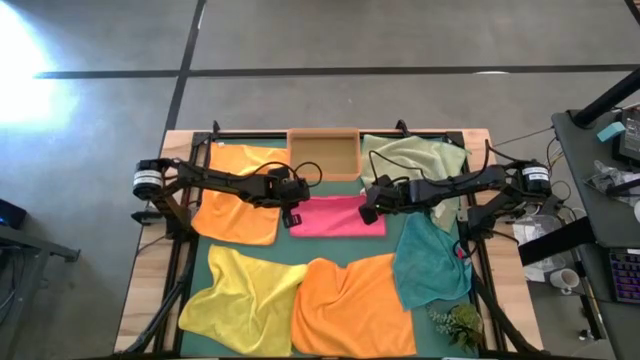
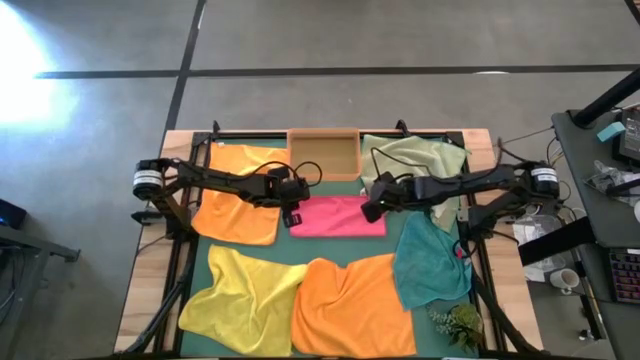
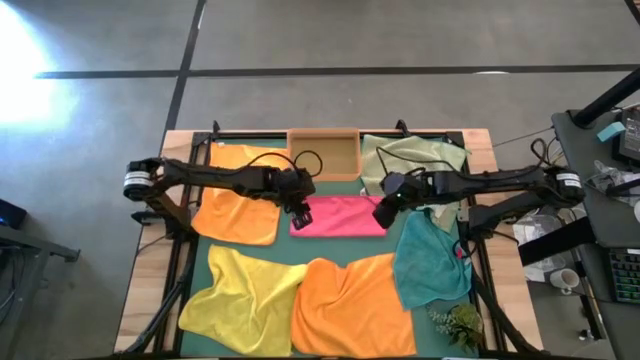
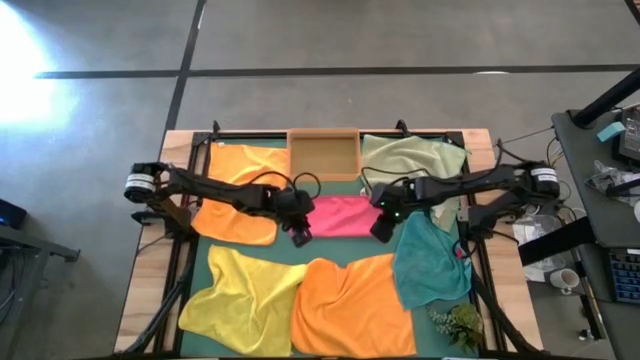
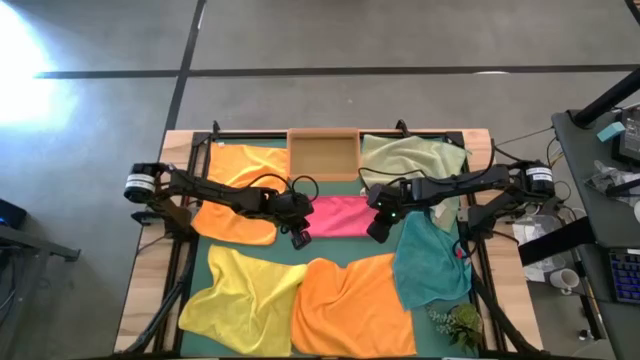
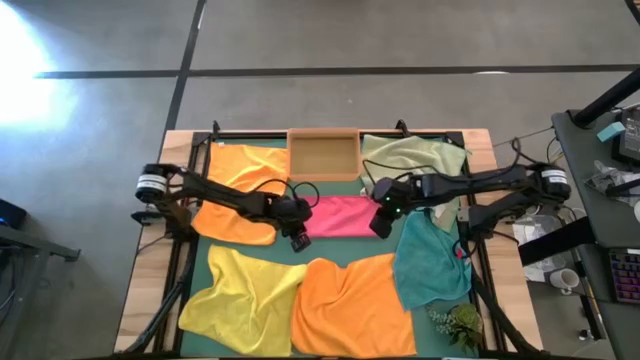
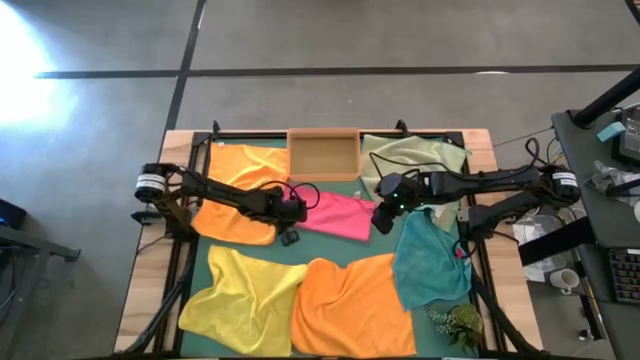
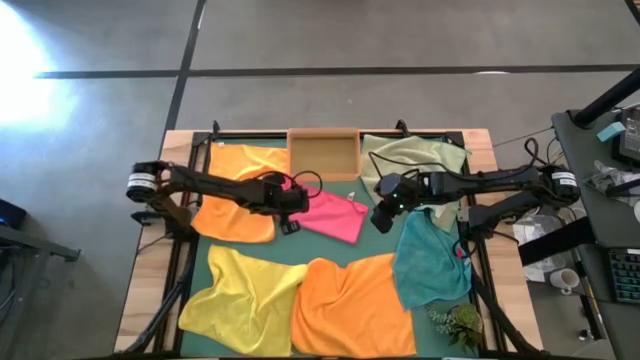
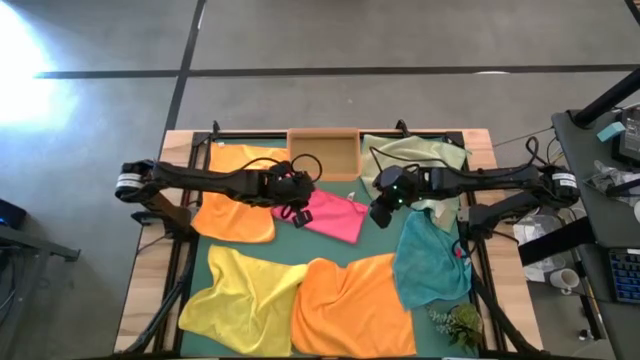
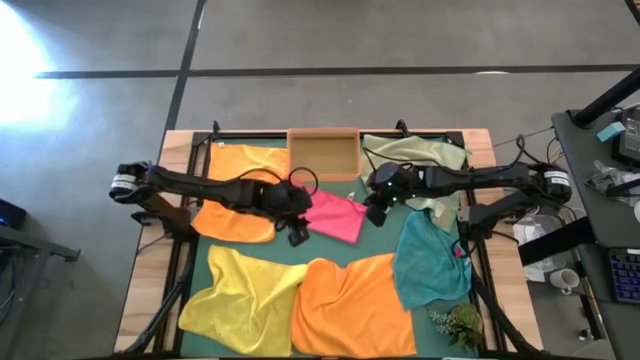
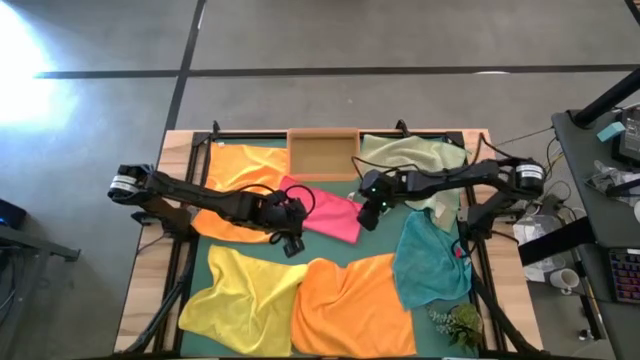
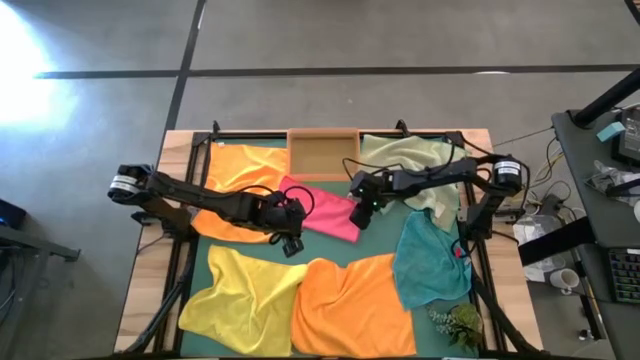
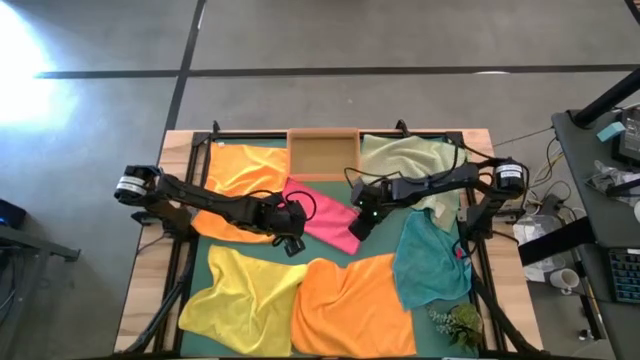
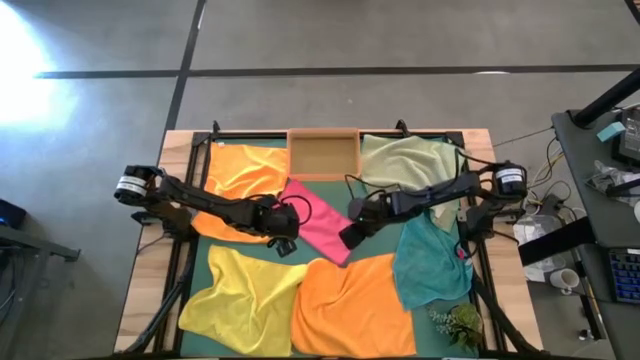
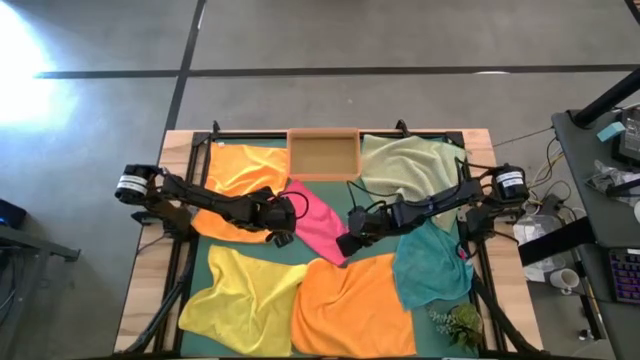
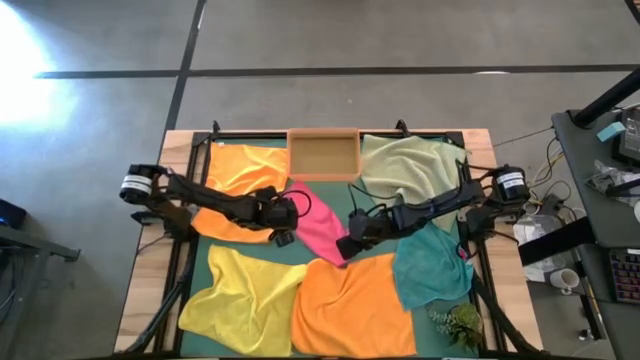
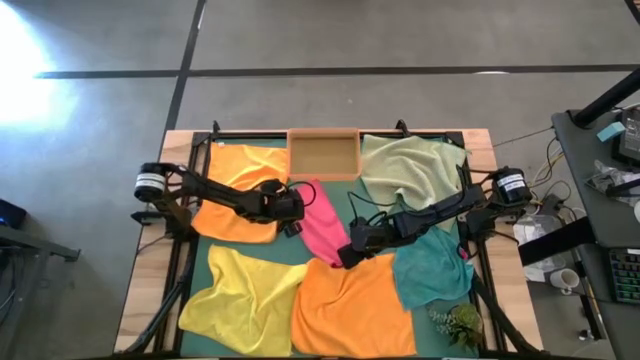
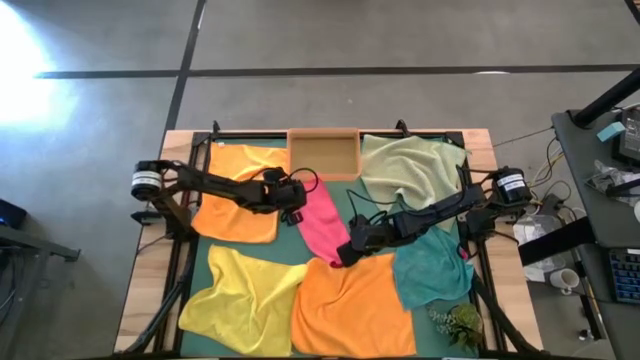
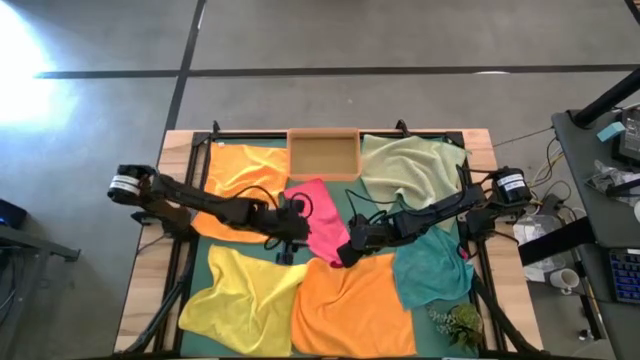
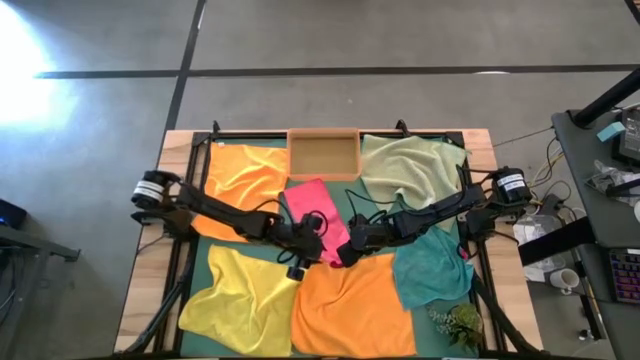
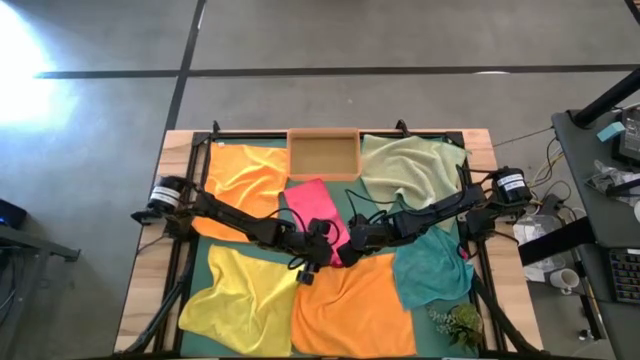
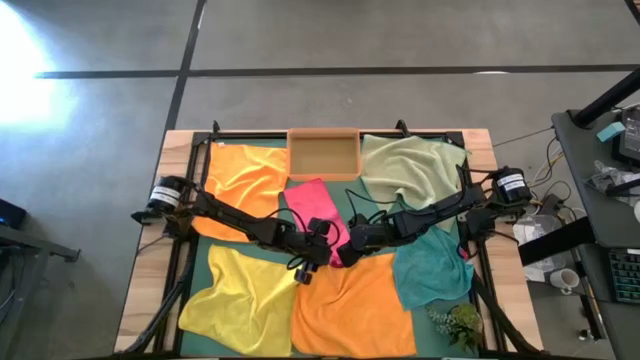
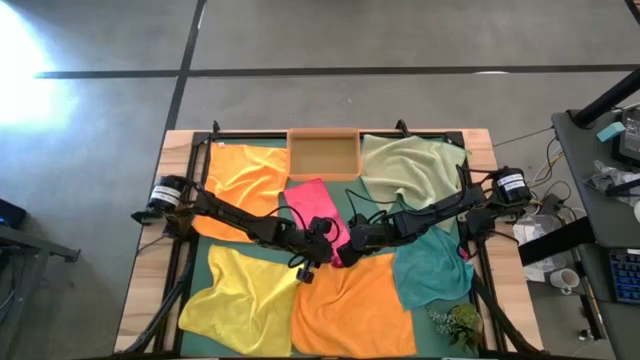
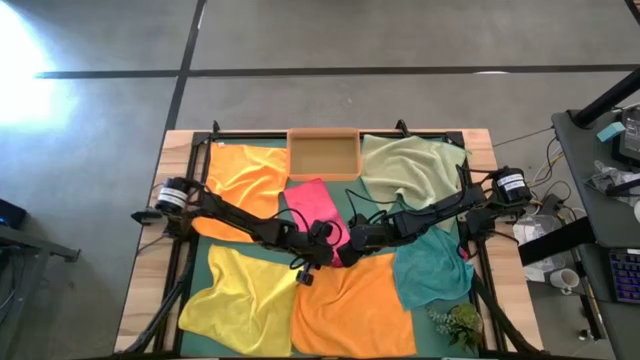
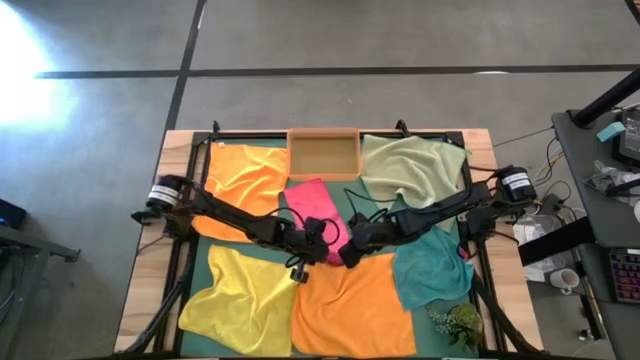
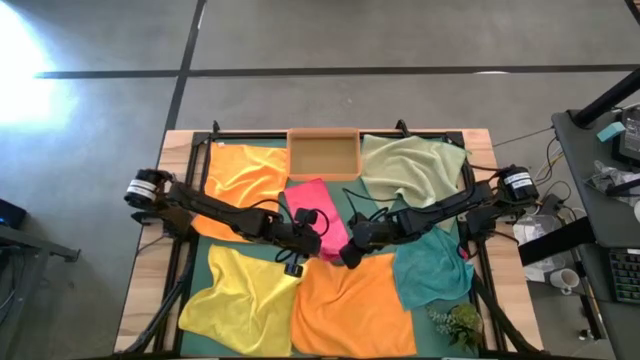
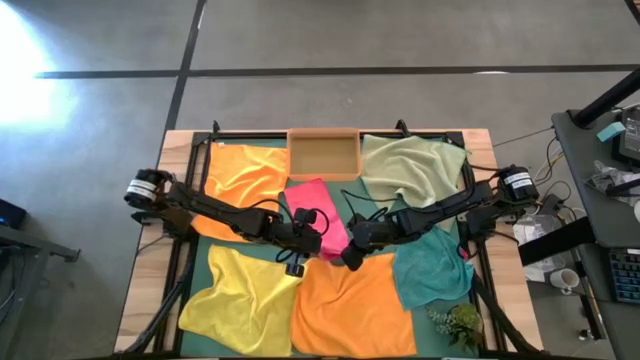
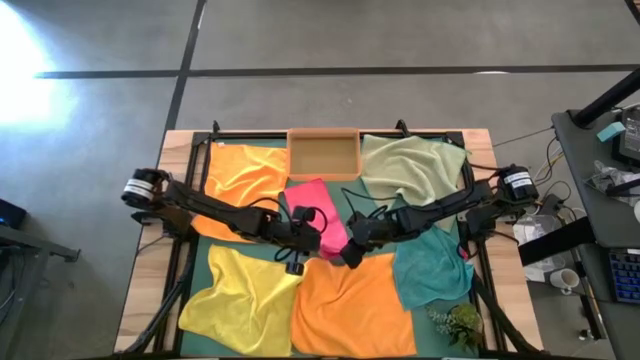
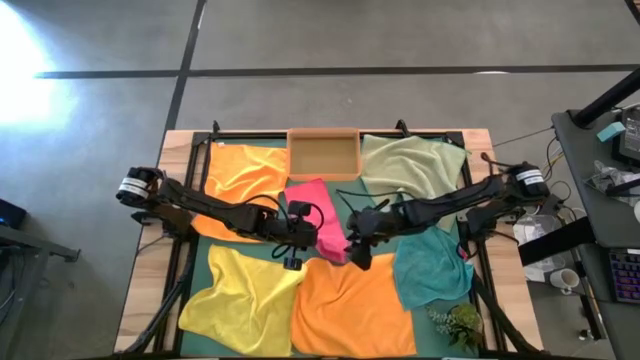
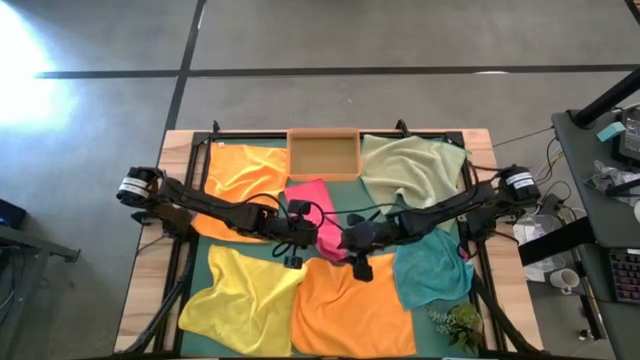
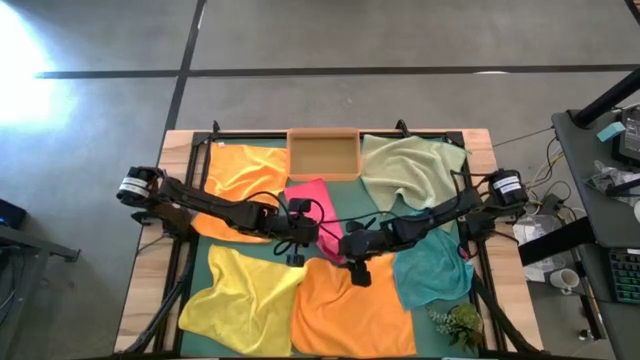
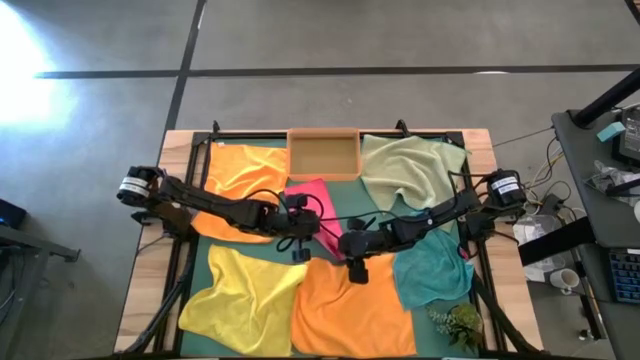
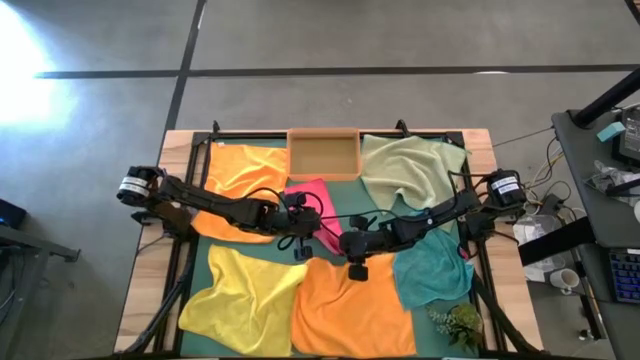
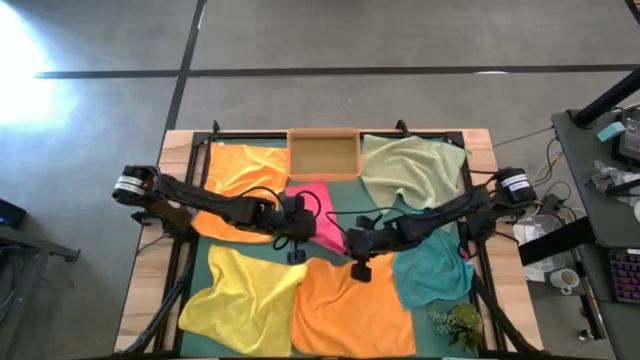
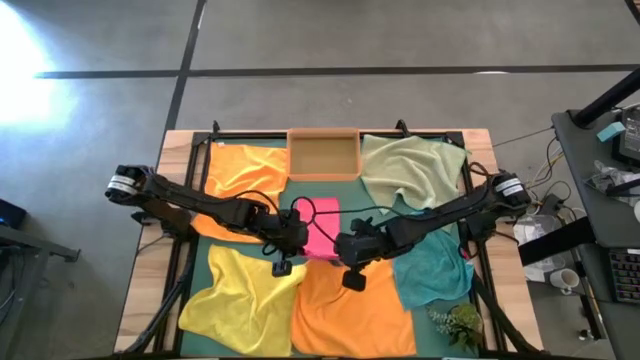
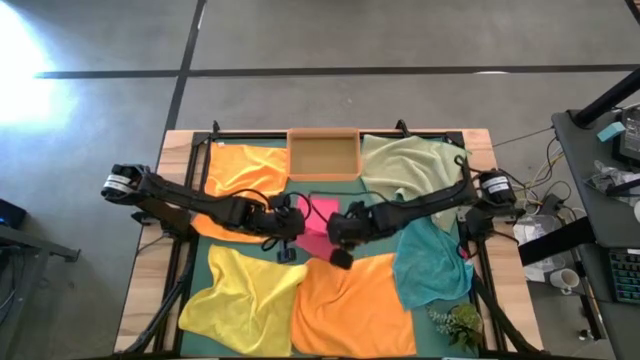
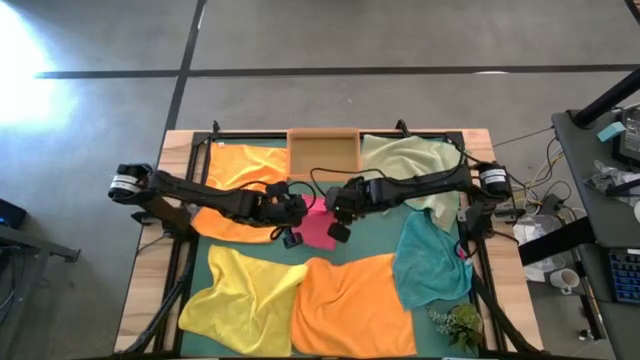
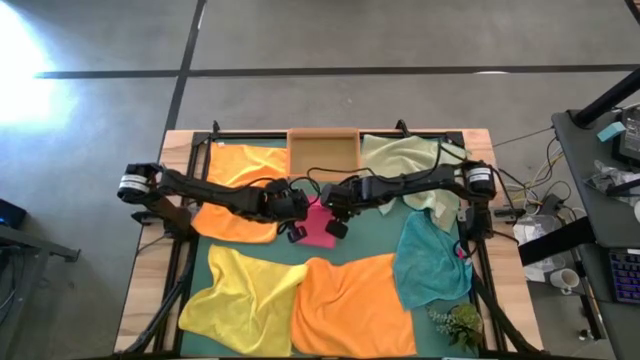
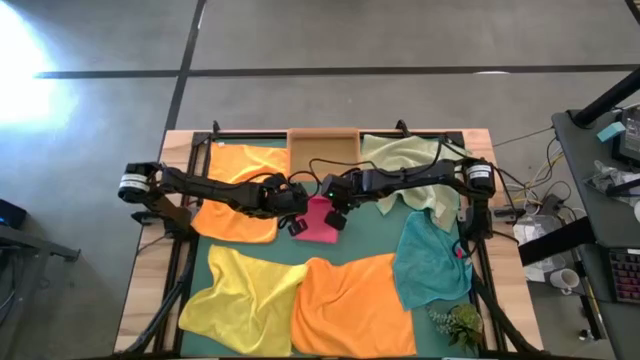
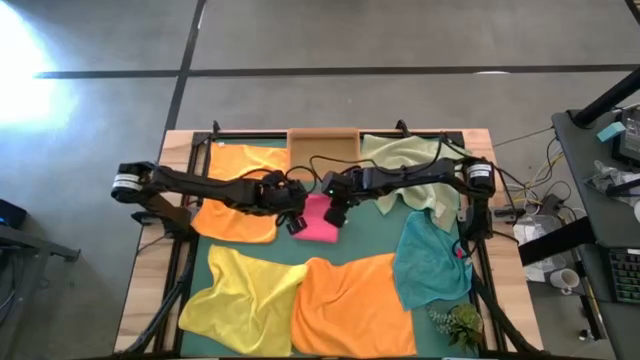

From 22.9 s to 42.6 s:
Task: Fold microfiber towels
Fold the pink towel
